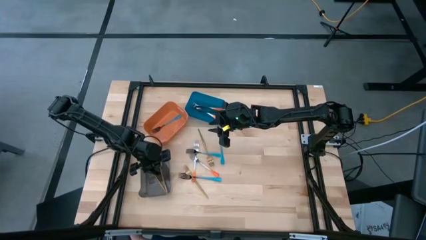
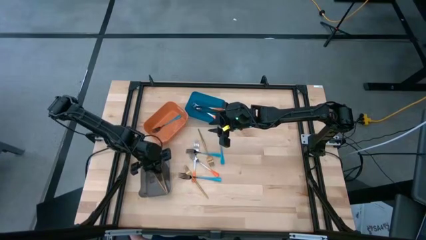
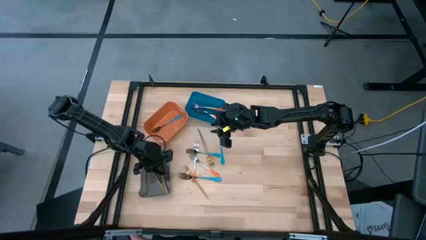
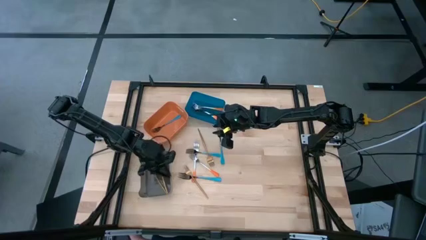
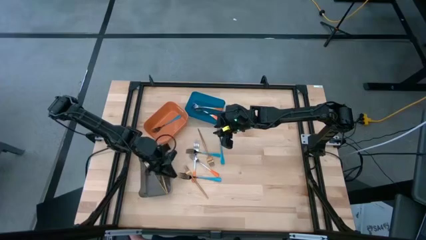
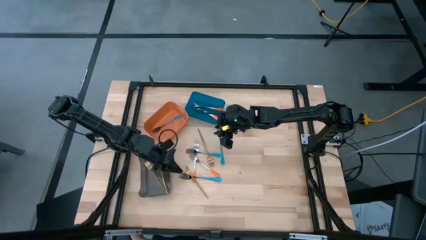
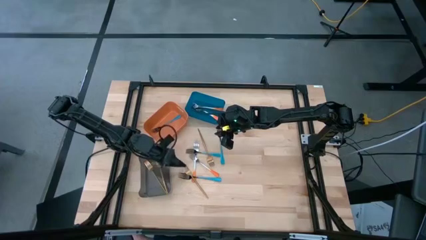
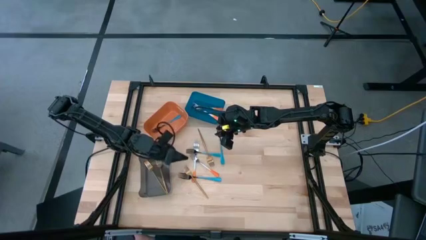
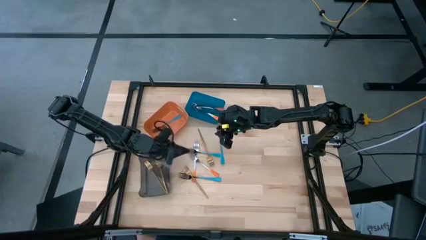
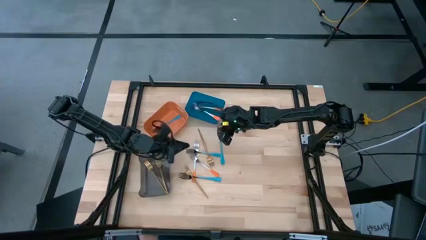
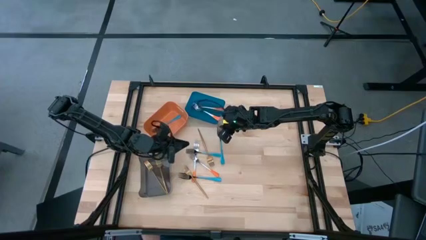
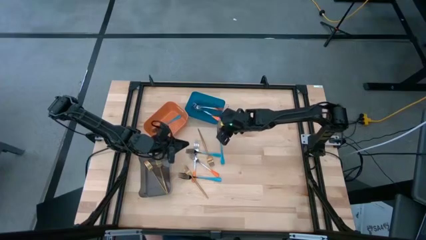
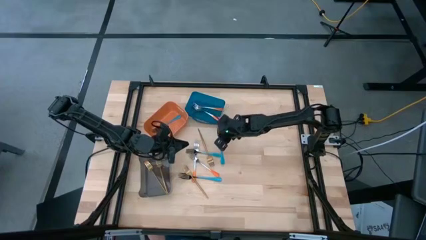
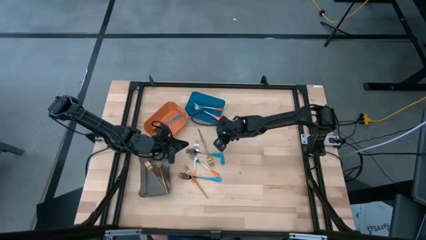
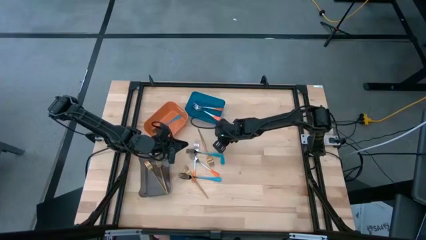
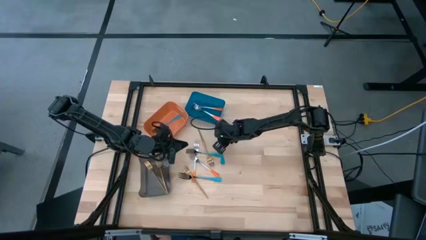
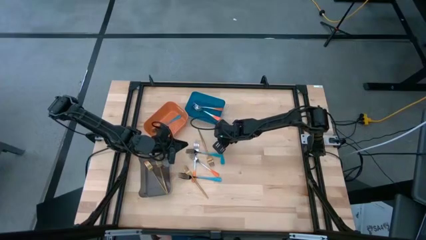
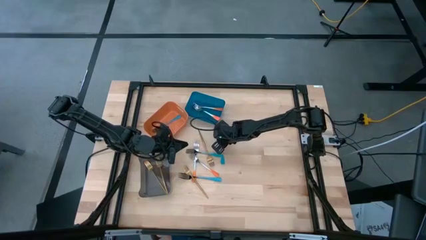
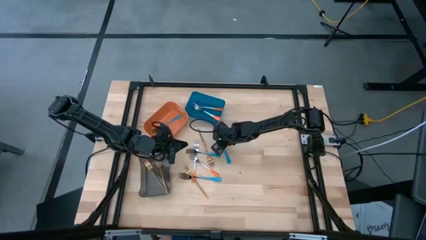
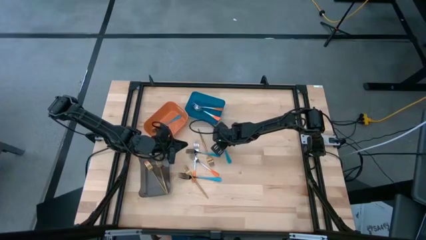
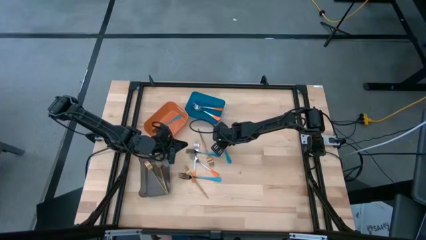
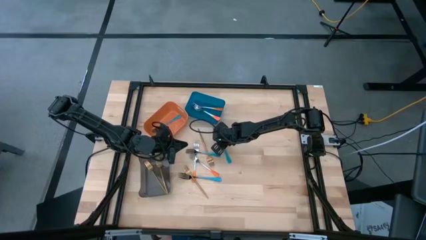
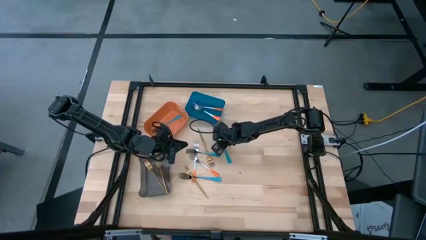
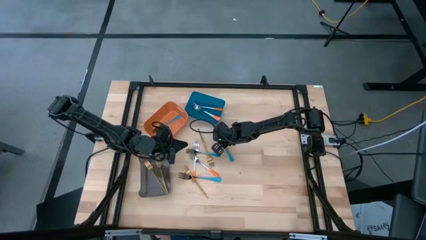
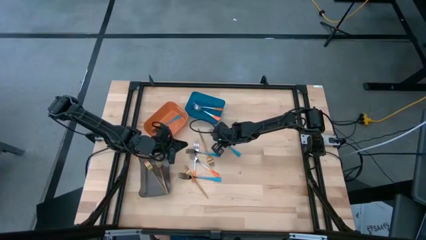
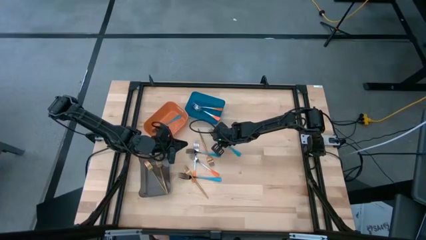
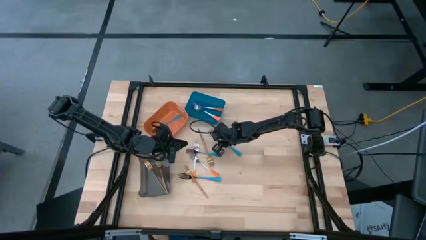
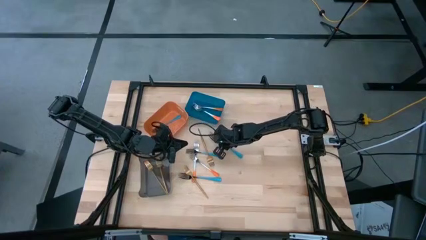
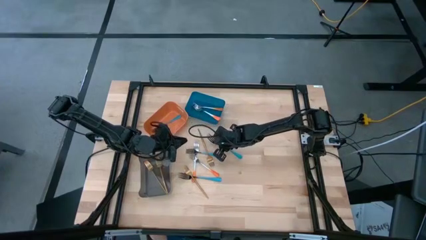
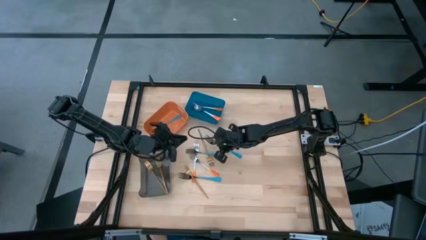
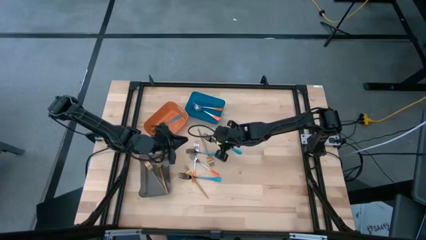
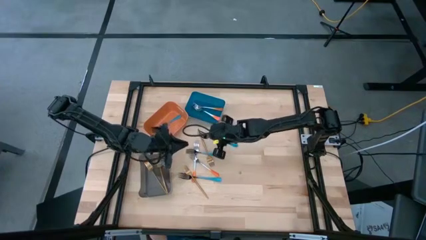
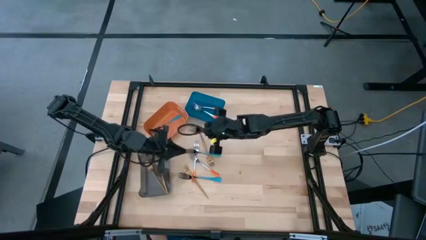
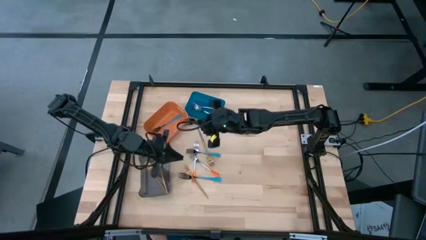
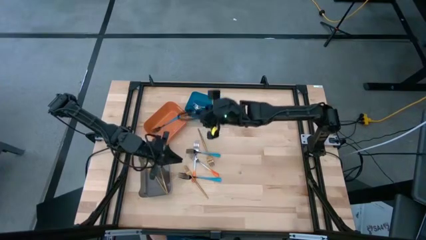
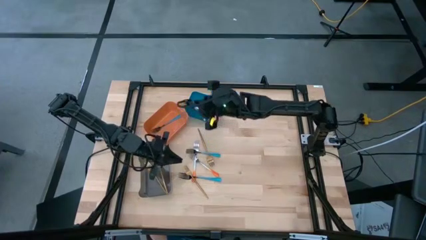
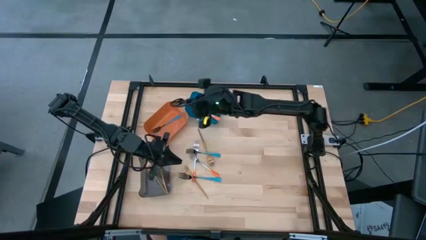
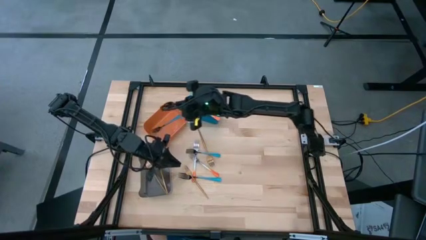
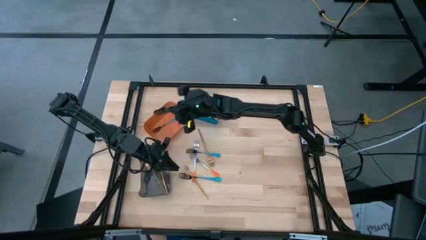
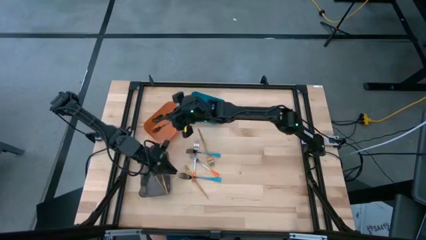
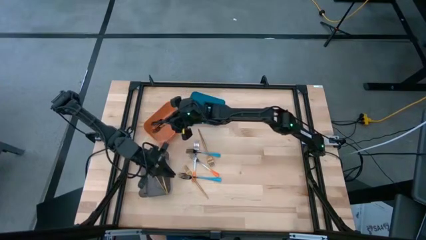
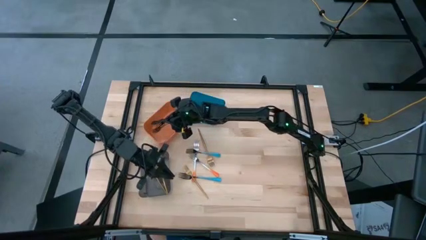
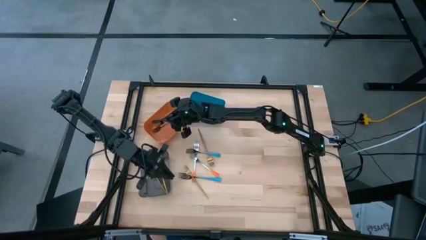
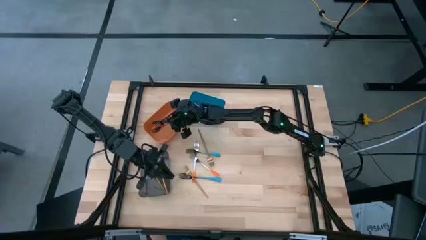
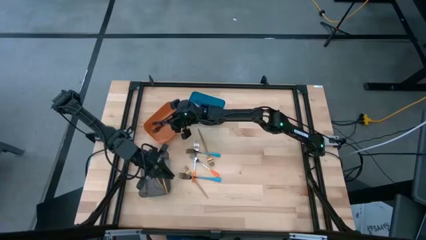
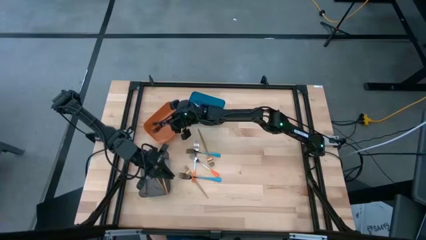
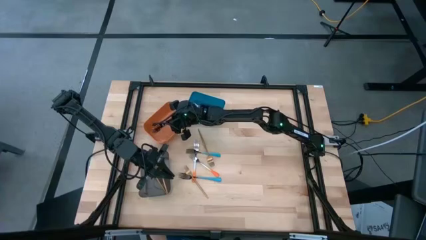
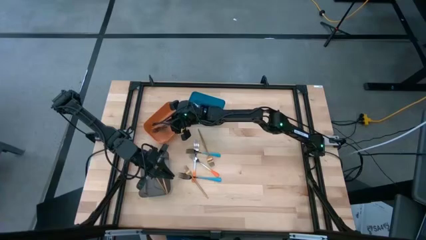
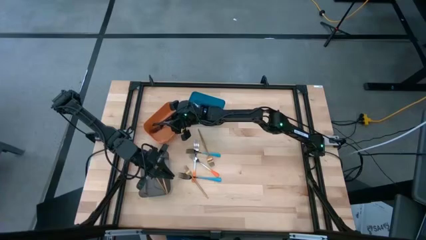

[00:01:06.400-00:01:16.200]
Task: Sort silverware by color (type)
Put the blue fork into the orange bin
